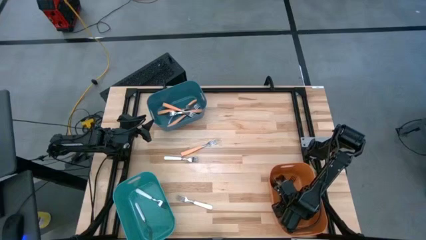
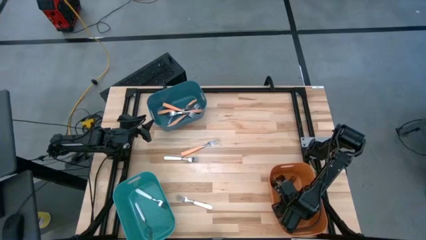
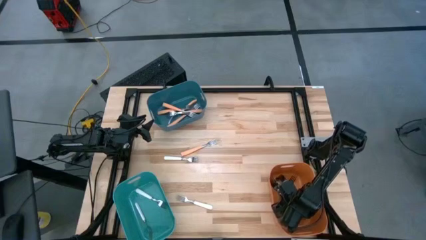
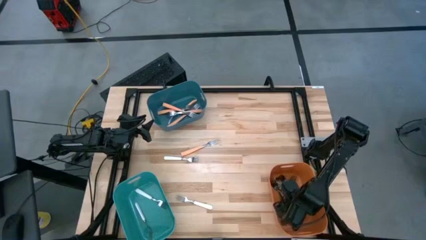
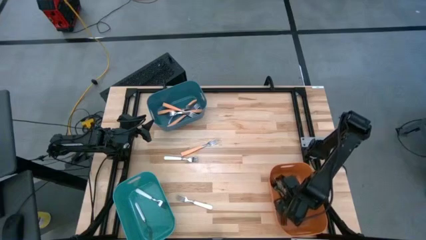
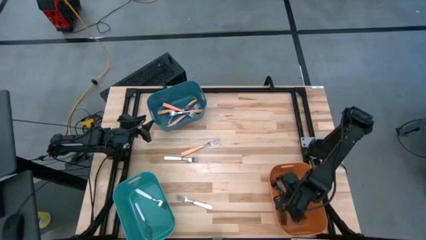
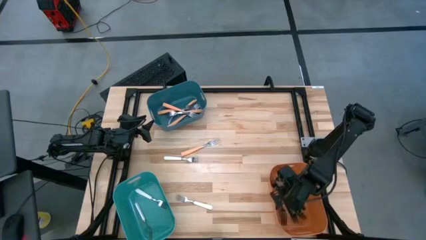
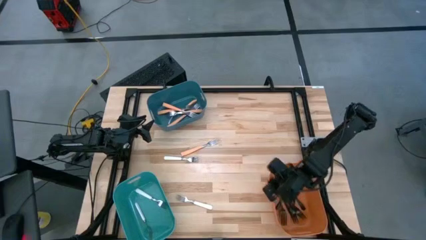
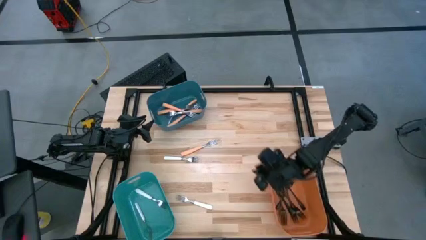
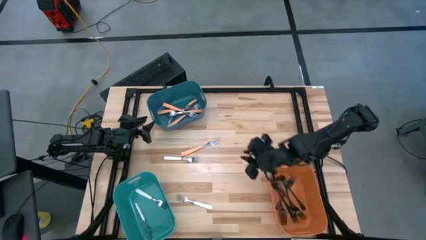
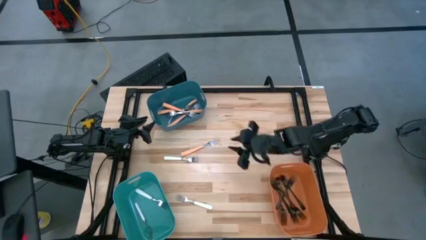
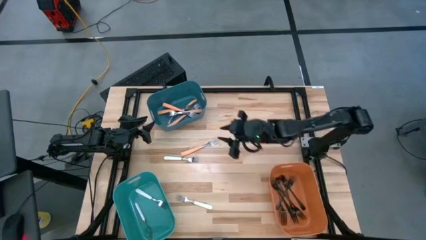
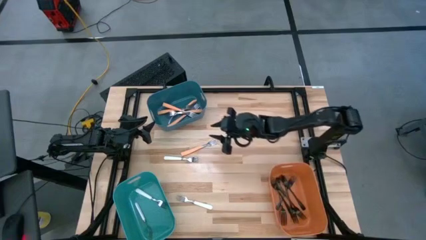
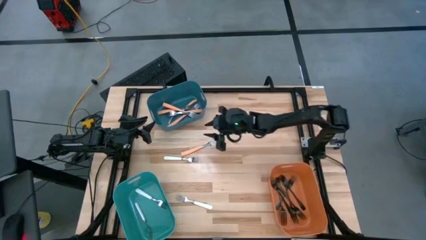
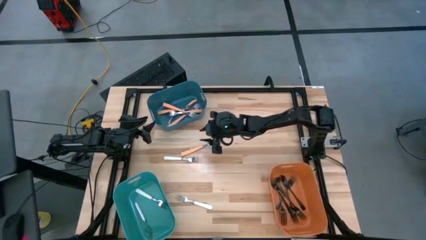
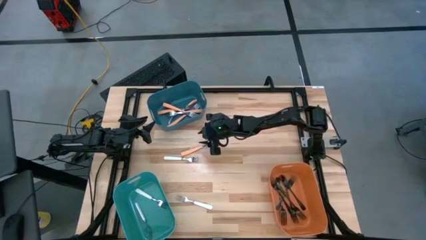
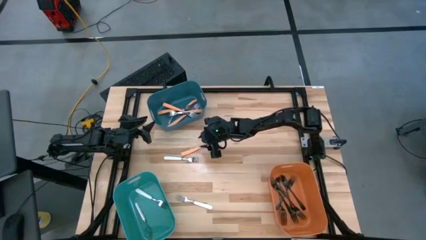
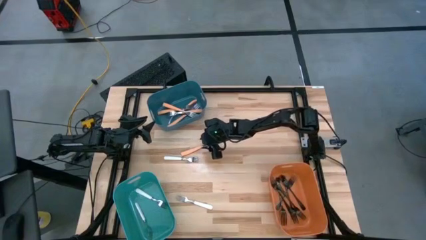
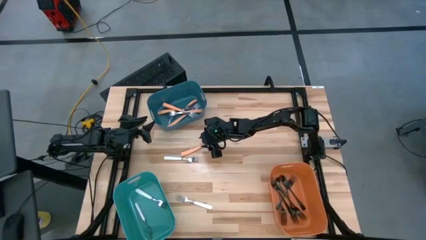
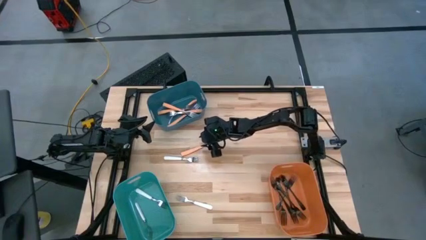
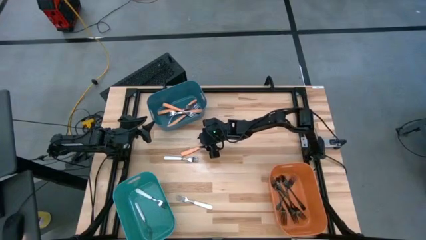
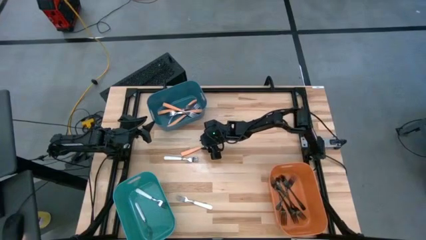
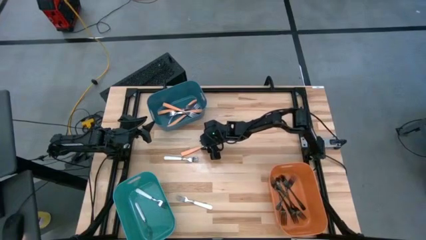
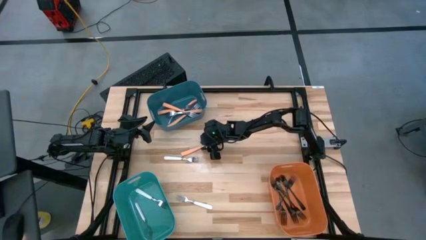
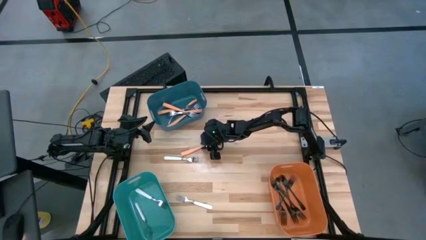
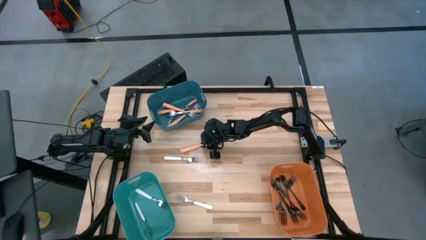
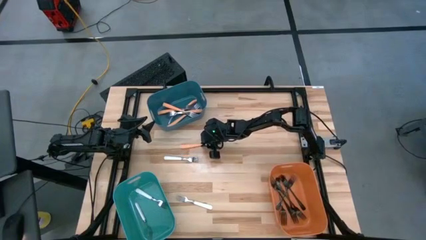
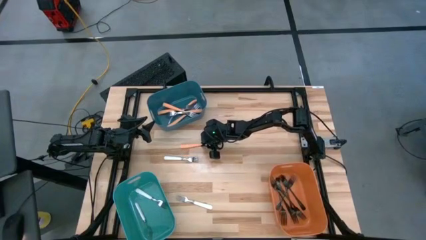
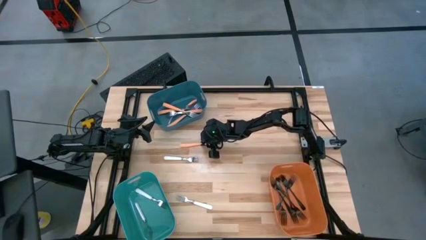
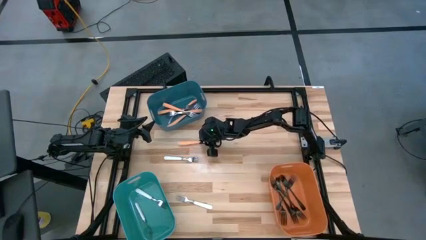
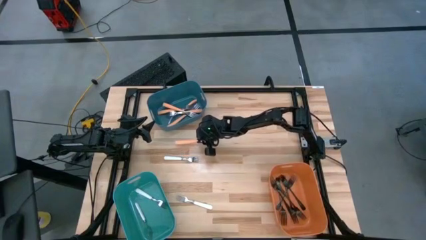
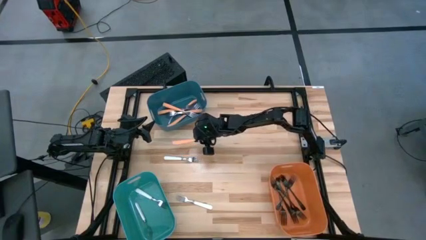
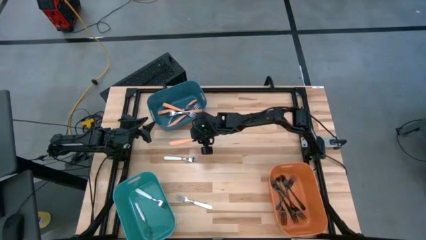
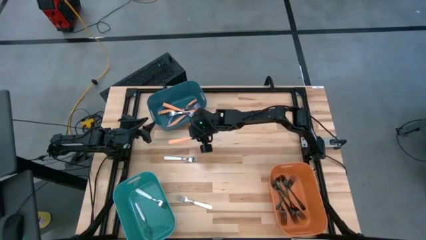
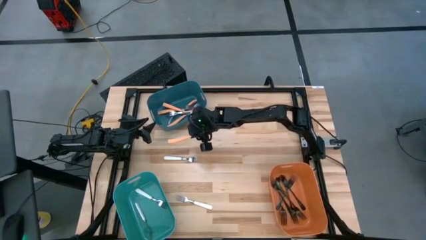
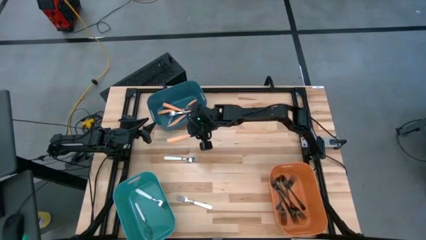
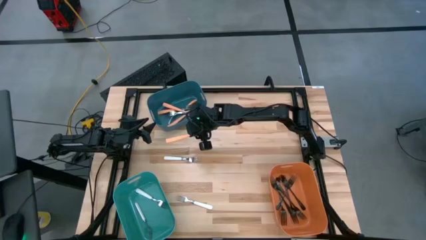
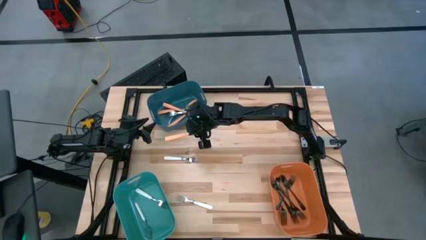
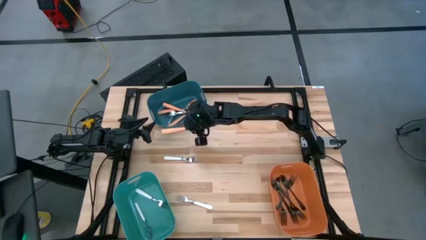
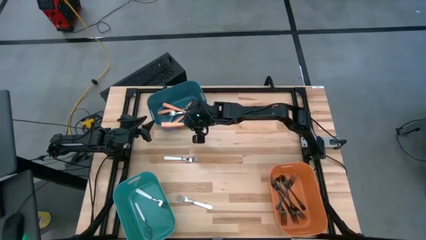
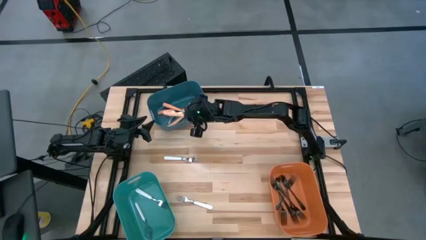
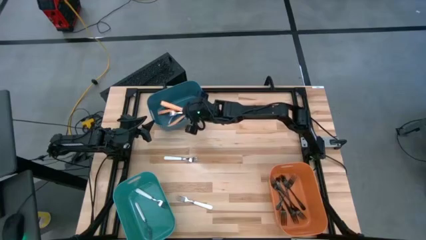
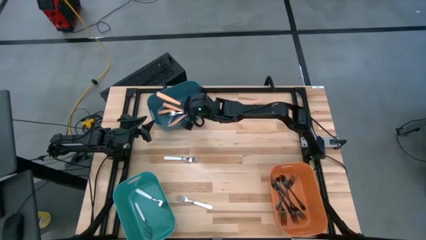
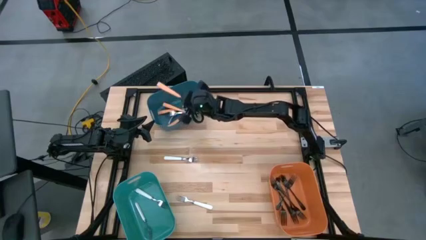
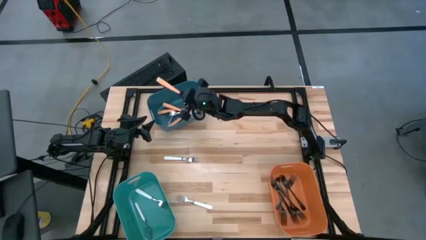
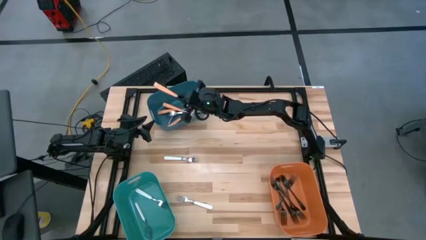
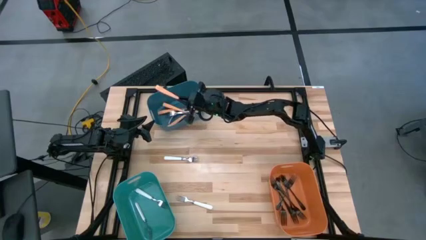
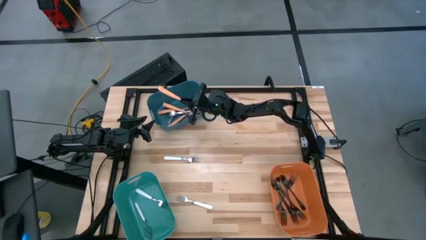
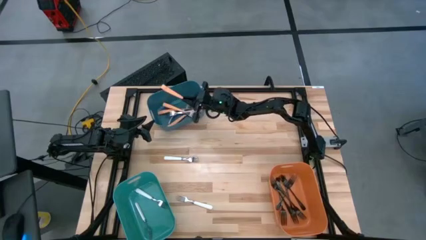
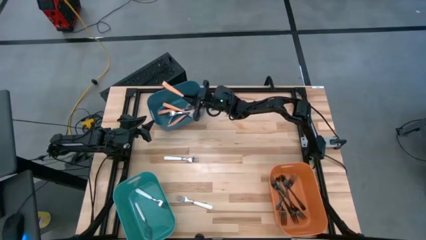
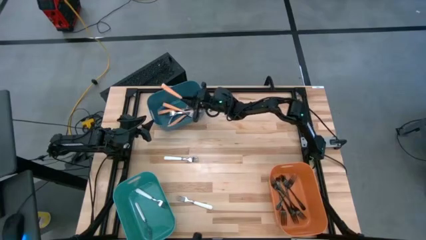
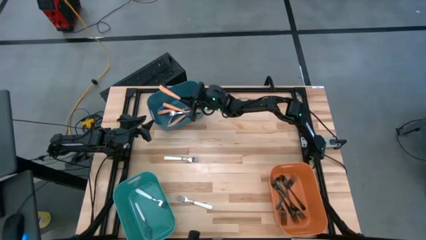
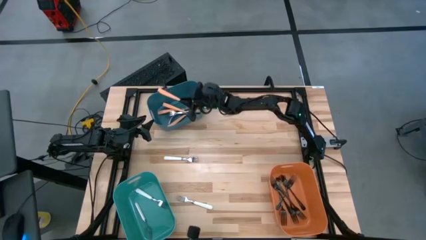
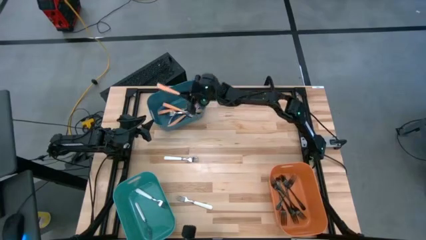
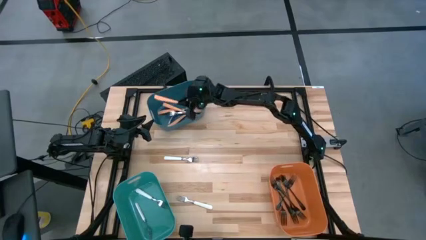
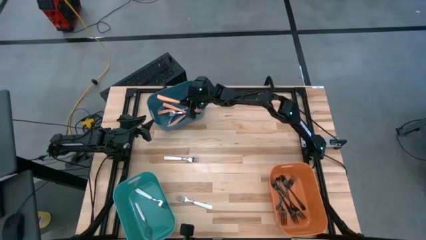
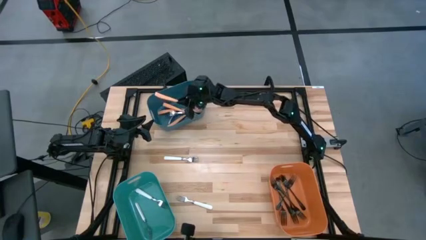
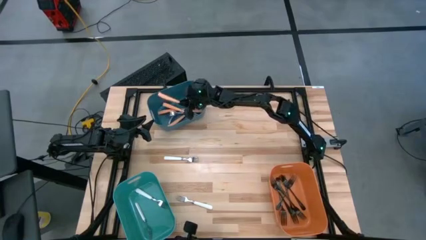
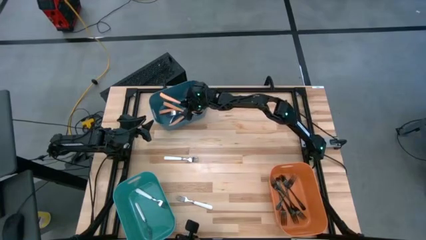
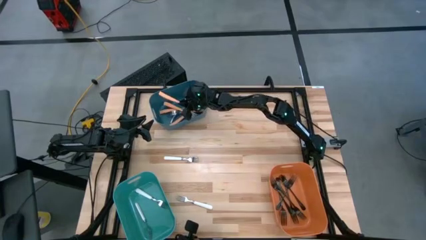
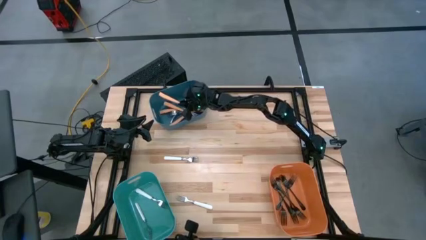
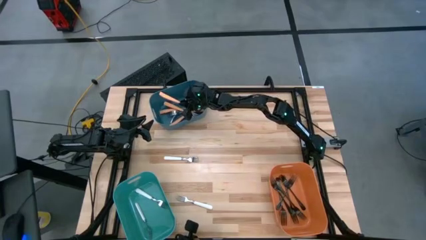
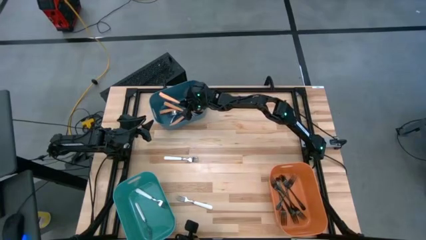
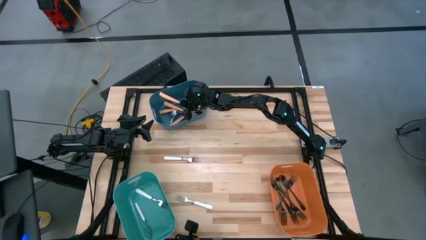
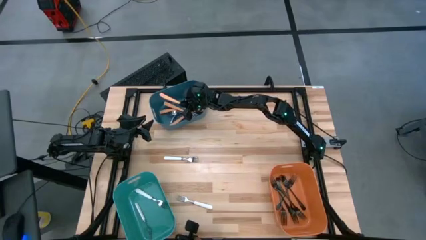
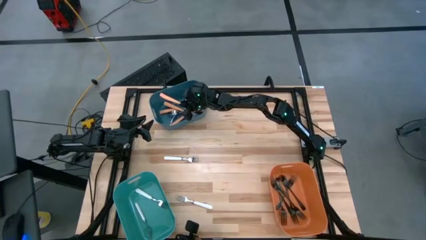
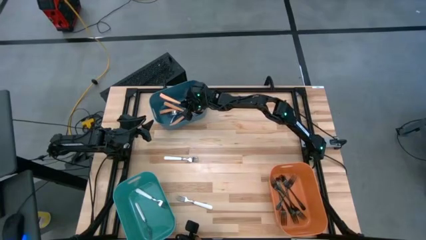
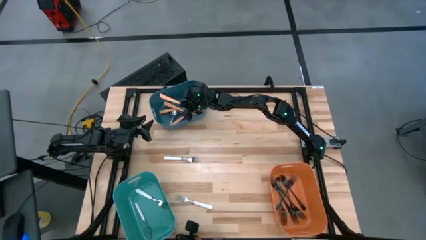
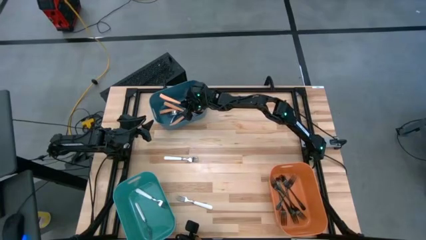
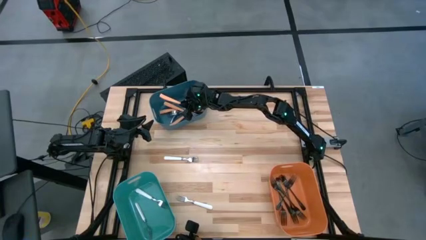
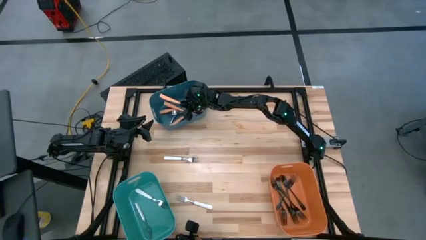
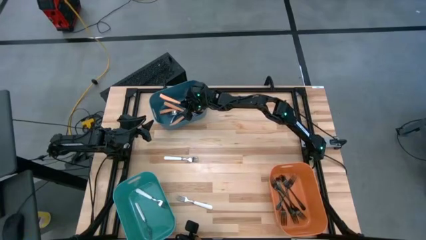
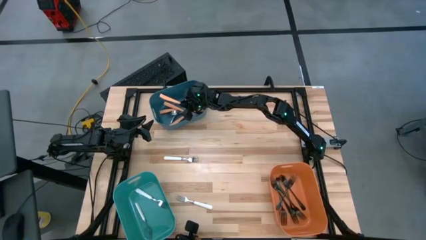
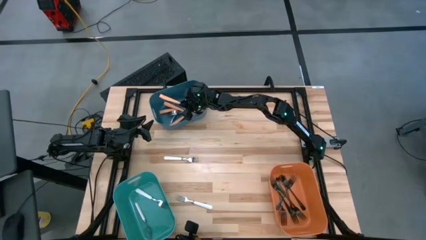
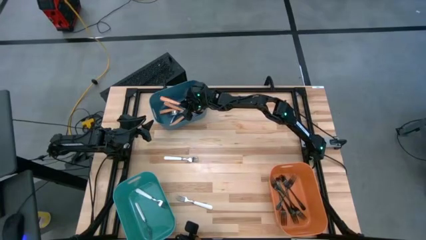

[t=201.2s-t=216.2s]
Task: Sort silverware by color (type)
Put the orange fork into the blue bin
